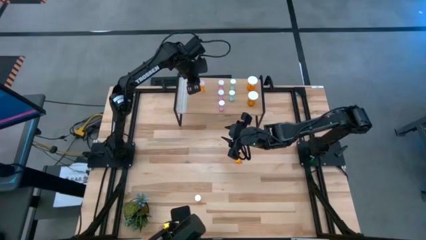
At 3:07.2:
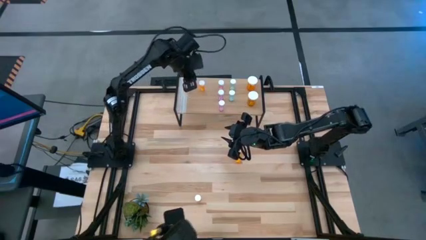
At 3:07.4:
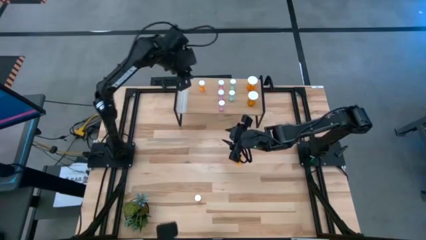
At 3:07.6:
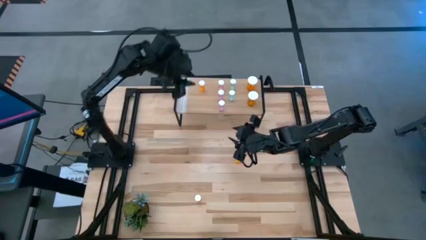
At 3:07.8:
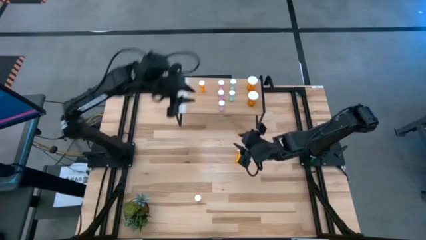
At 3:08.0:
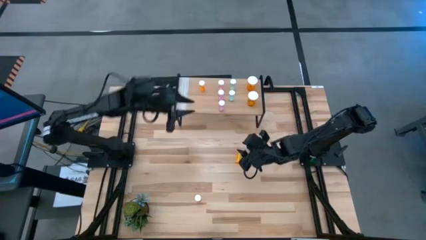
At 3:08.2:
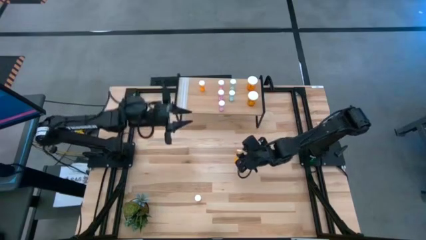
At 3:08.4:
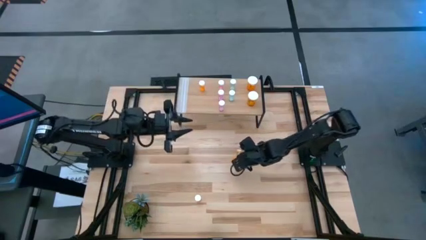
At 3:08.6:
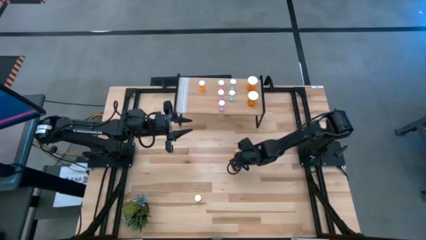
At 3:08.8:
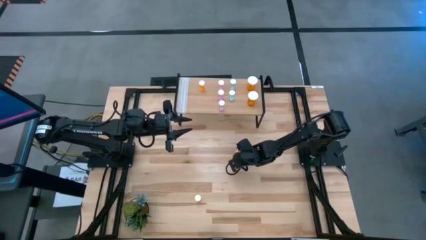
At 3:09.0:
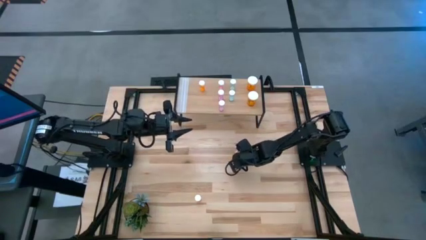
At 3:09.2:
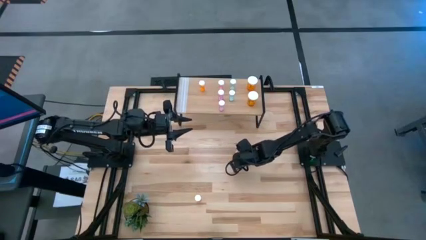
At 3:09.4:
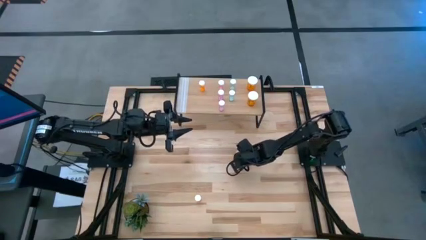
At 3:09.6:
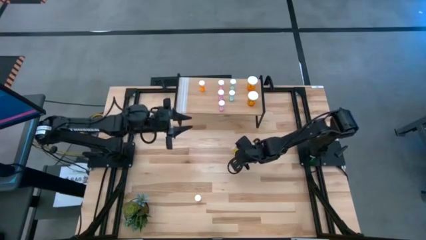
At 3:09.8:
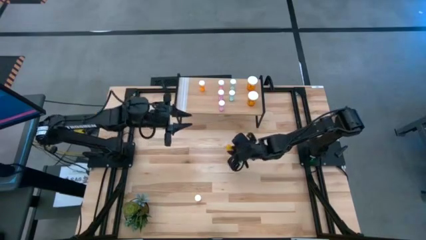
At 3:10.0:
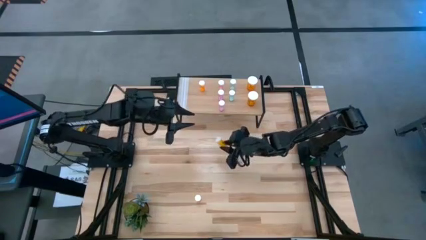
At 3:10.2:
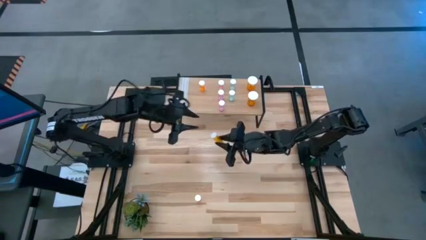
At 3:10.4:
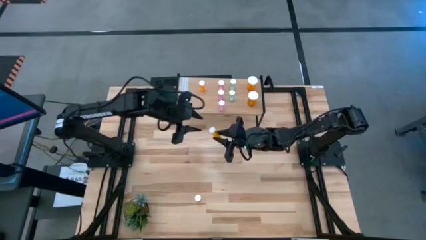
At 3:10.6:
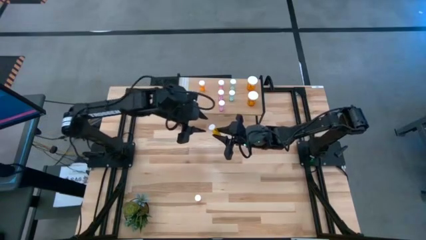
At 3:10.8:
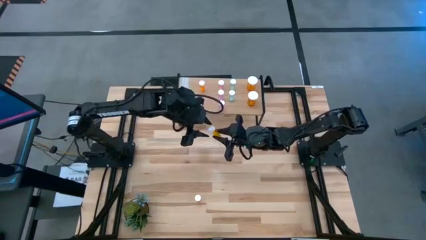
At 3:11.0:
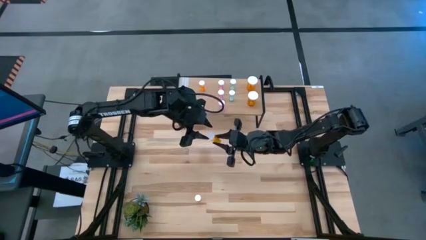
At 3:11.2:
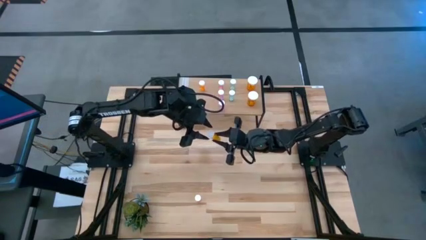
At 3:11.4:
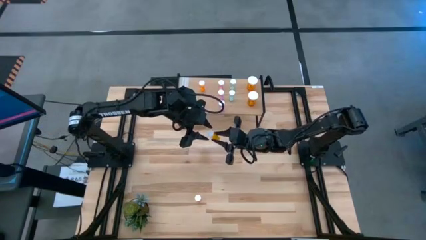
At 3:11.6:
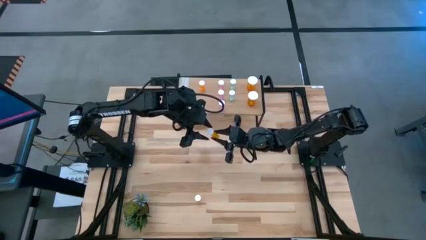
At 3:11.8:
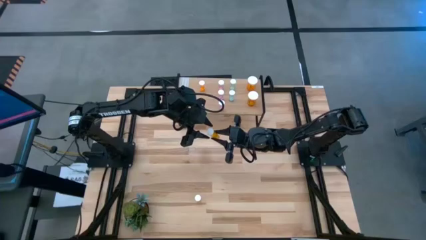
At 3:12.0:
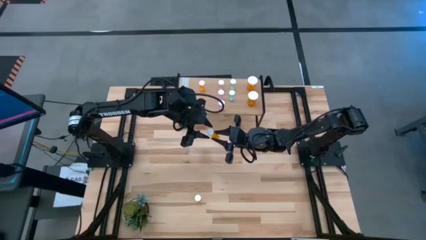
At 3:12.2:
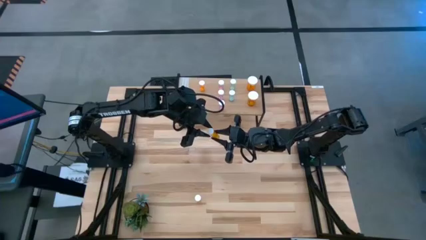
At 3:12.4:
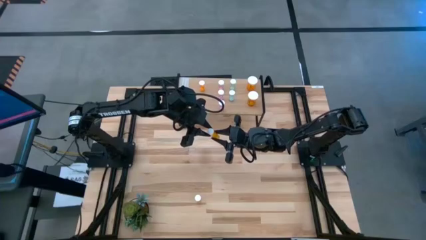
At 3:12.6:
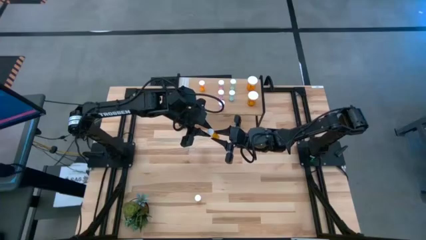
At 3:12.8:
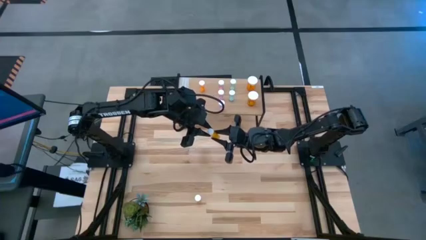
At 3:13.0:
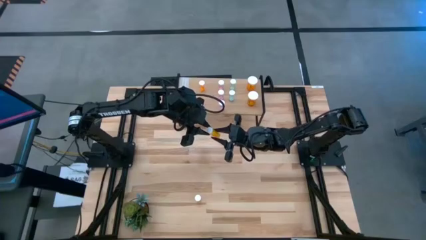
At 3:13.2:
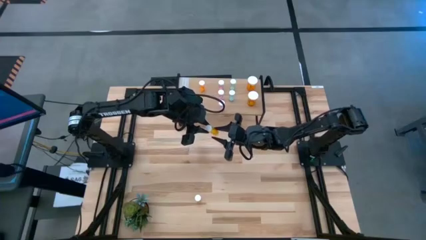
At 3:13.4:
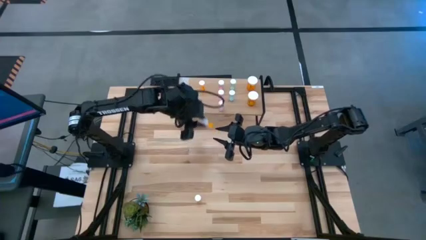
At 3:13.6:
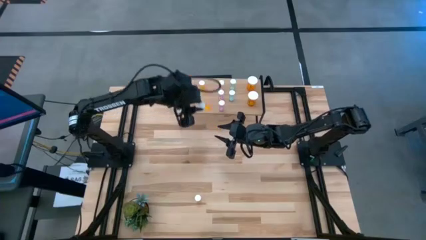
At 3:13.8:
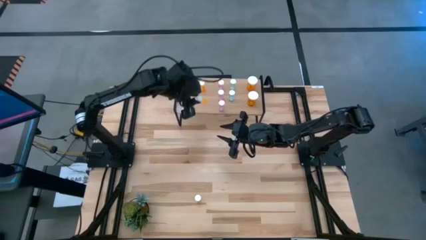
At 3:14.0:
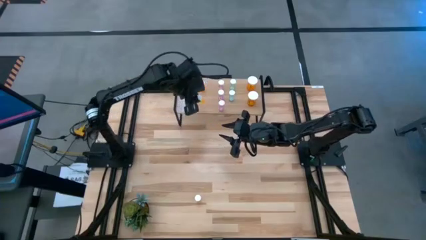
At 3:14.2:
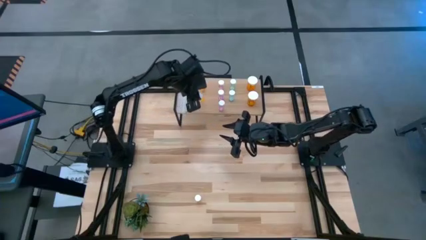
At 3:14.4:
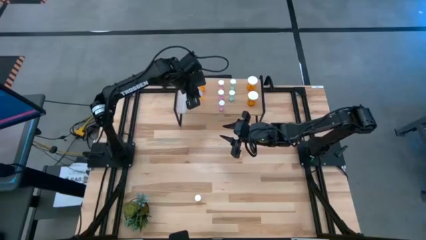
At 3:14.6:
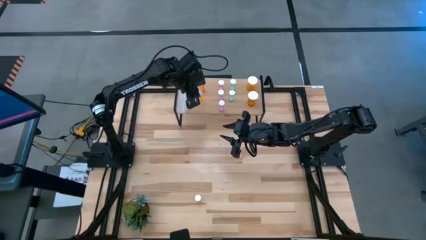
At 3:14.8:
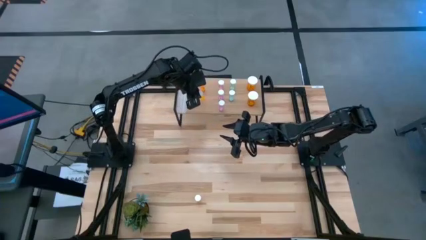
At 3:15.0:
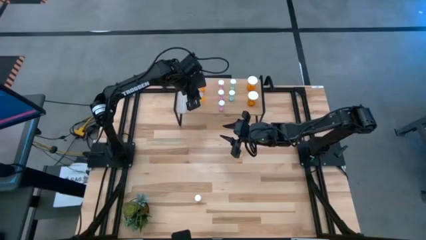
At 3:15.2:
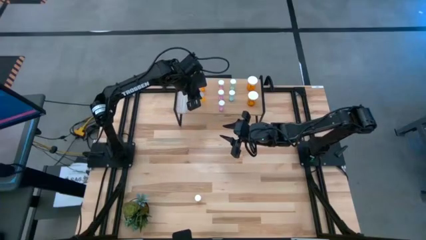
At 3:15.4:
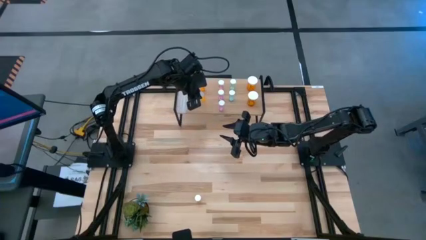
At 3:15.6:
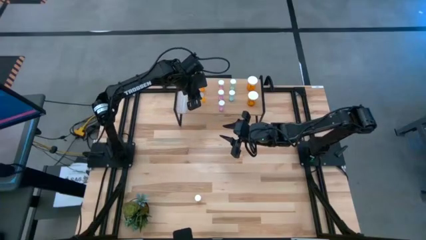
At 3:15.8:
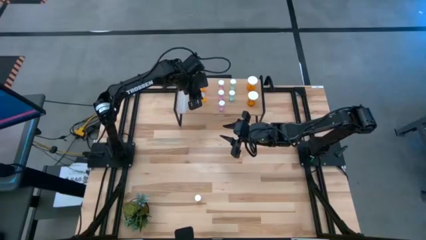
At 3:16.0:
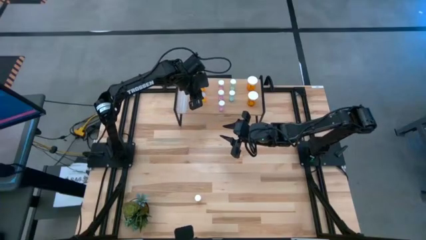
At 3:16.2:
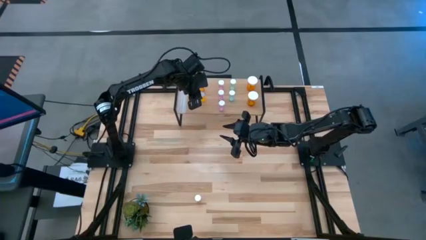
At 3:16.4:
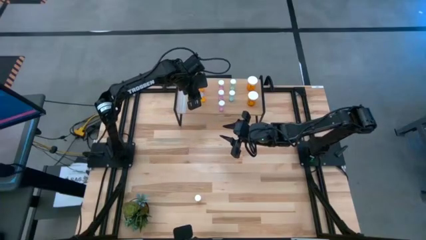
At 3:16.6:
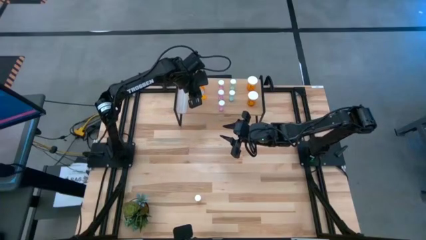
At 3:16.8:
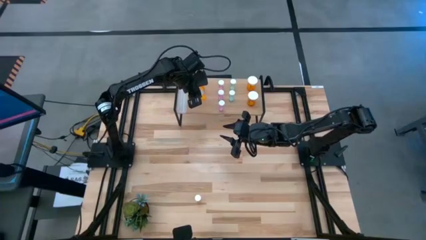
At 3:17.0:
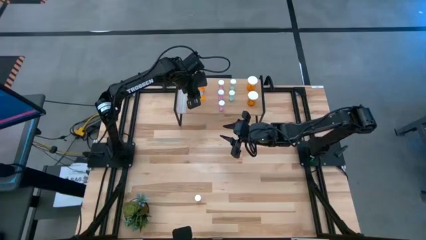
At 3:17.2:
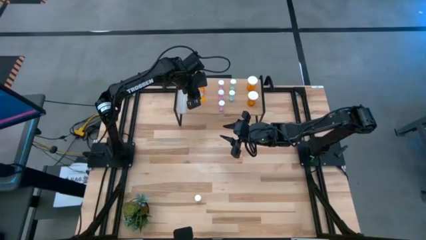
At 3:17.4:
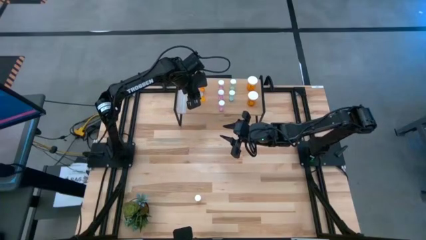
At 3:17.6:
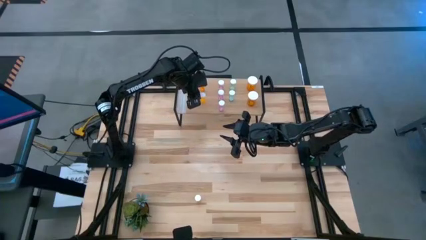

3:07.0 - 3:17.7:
Task: Pick and place medicine bottles onto shelf by color
Put the top small orange pill bottle on the shelf aligned with the other small orange pill bottle

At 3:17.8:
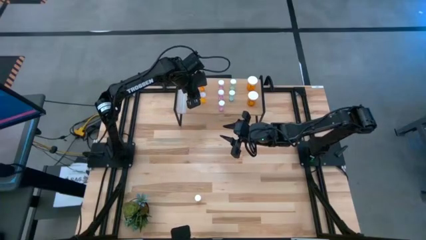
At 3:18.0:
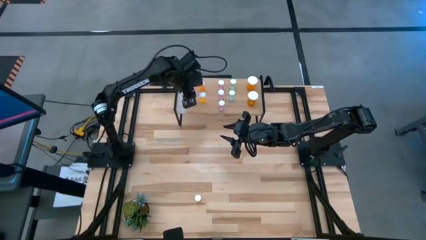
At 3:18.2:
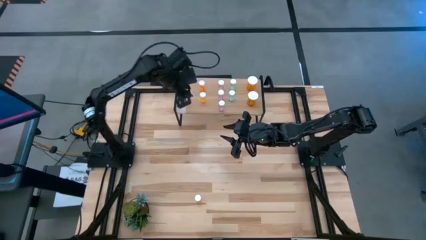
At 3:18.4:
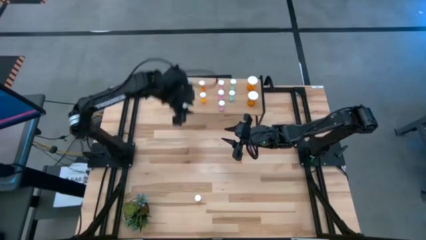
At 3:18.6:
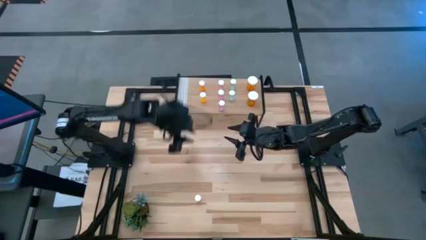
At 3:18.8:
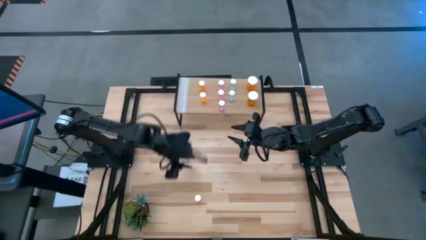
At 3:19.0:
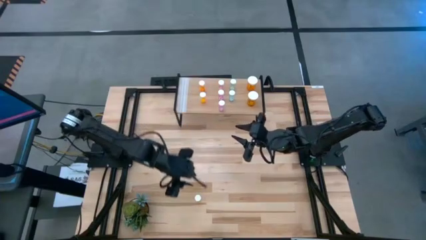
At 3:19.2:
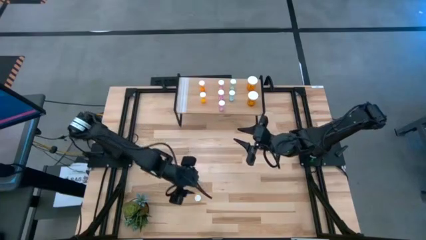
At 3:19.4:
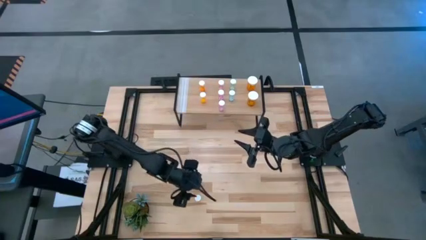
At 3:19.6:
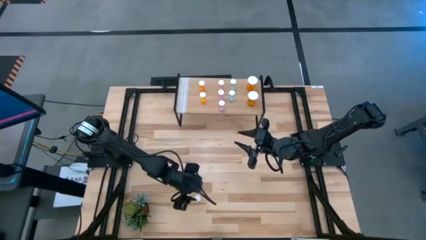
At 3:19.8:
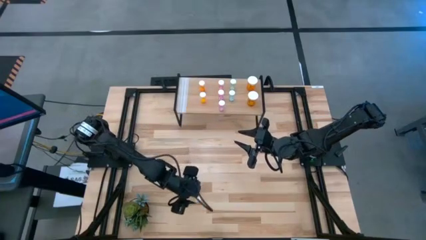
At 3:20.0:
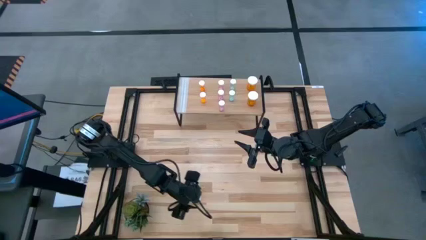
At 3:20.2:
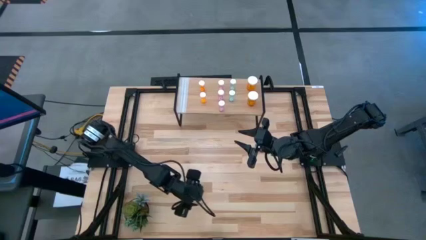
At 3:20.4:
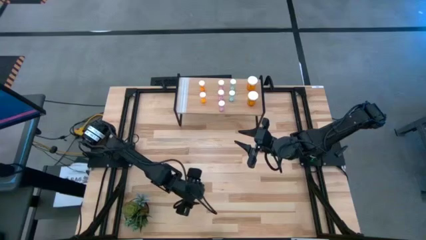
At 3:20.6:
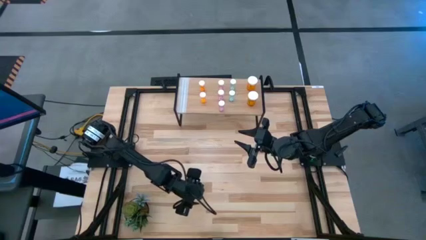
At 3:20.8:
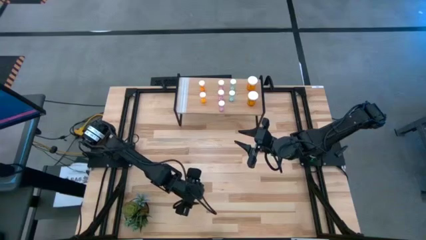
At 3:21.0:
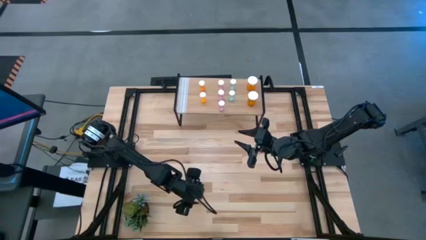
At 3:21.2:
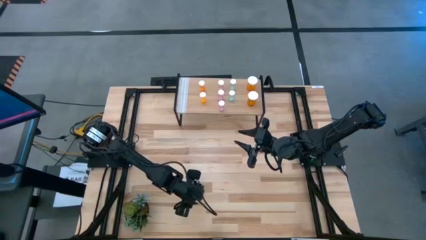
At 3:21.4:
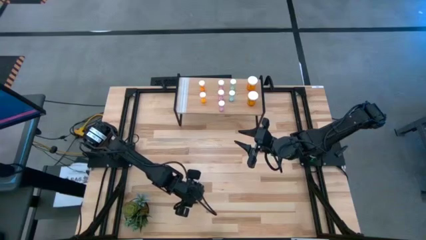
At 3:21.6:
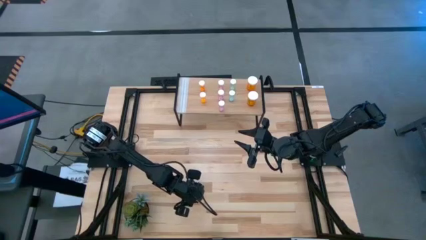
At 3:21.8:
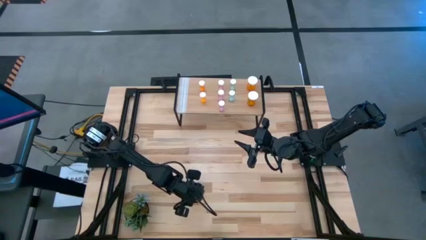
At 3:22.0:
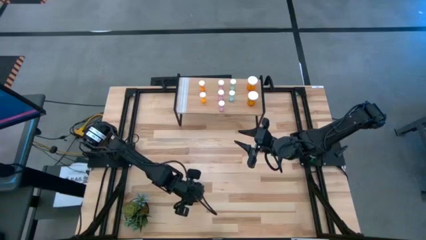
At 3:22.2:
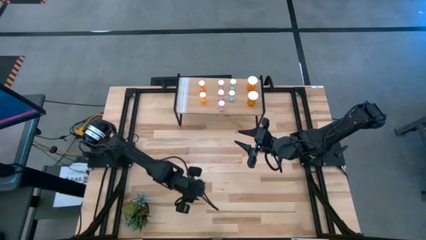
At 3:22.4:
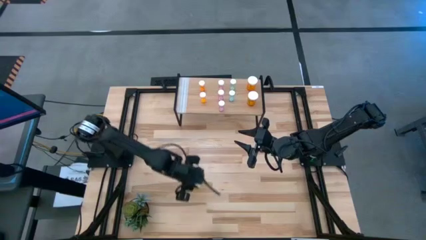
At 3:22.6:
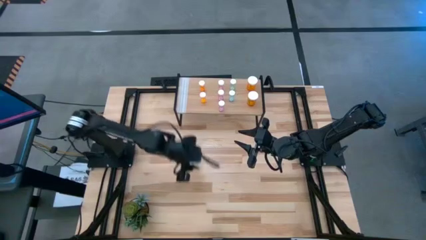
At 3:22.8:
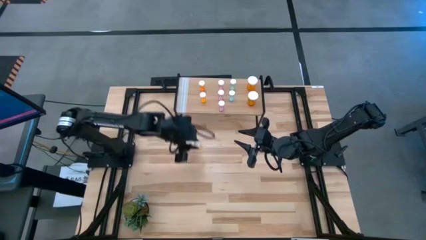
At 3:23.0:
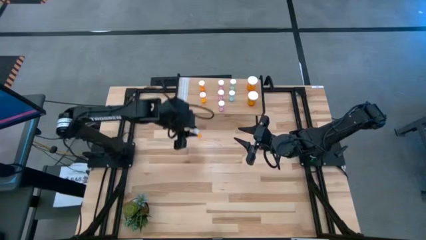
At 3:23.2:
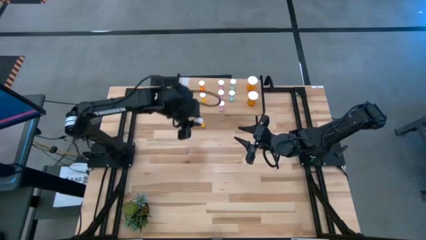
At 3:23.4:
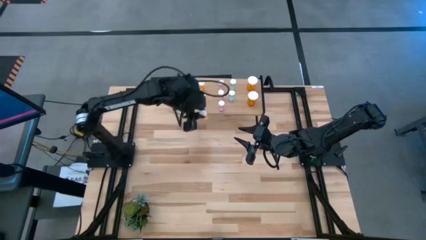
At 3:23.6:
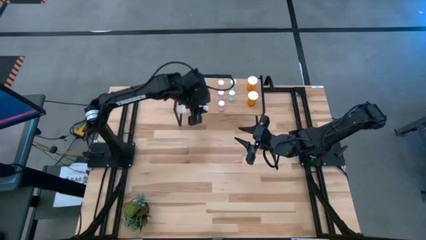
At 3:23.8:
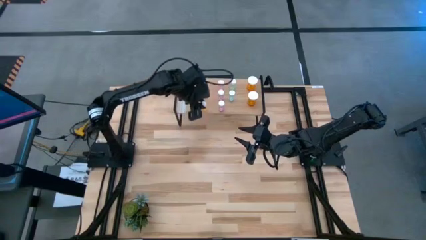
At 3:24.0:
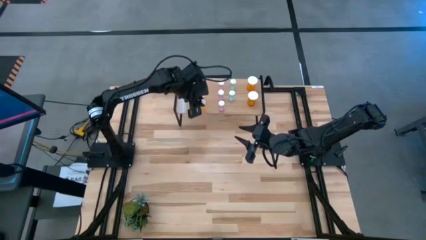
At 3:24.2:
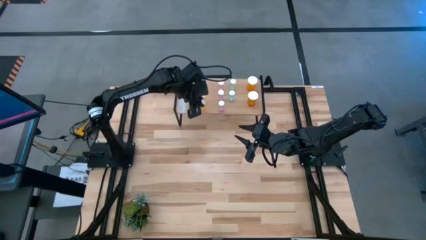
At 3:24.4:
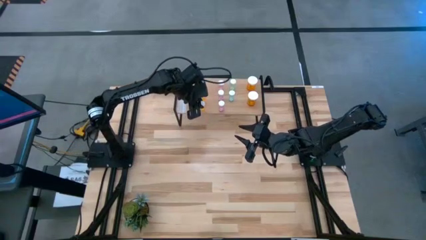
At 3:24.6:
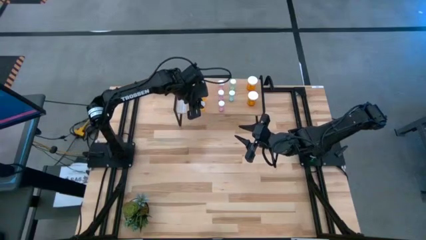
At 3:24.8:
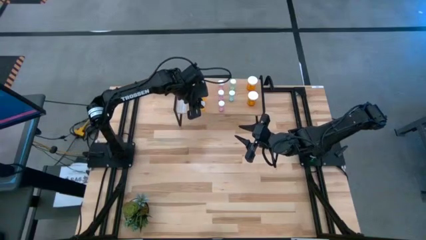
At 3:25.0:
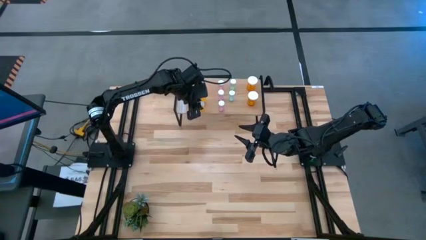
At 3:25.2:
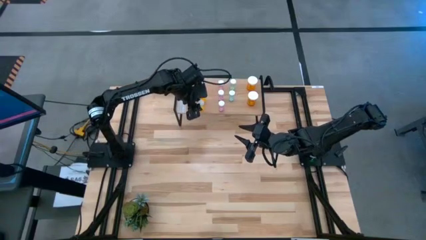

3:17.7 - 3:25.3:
Put the small orange pill bottle on the shelf aligned with the other small orange pill bottles
